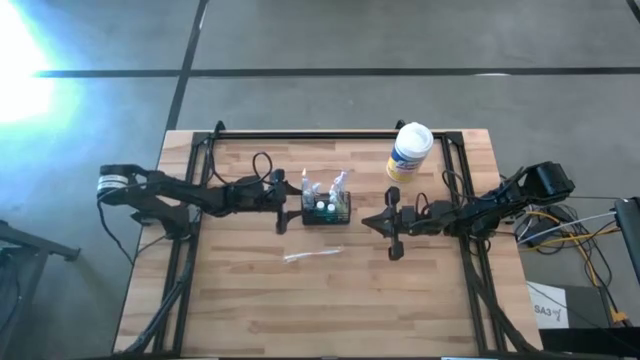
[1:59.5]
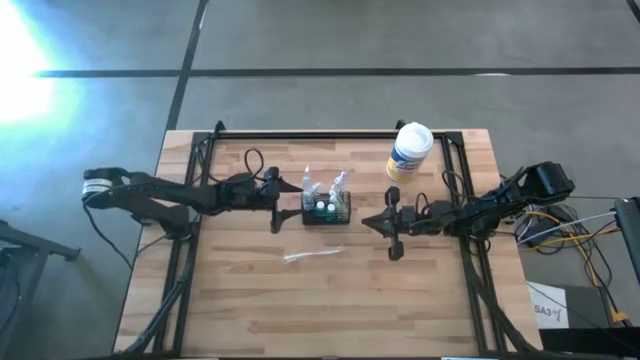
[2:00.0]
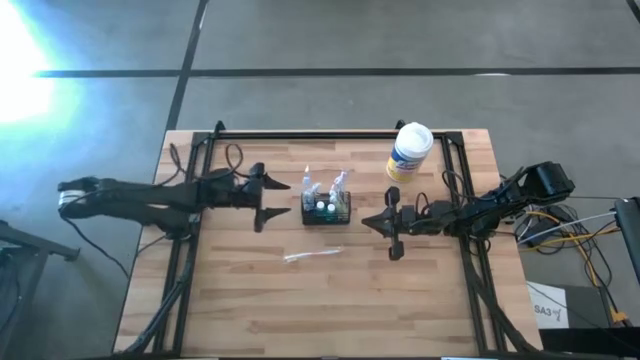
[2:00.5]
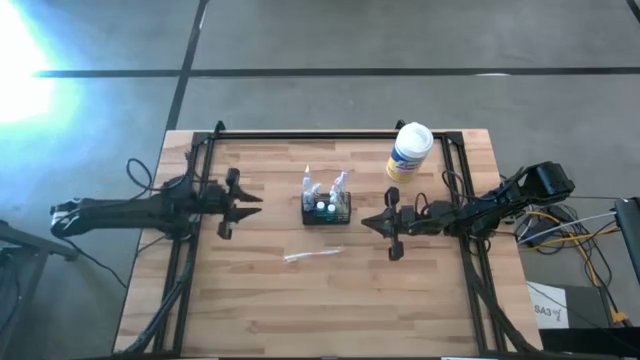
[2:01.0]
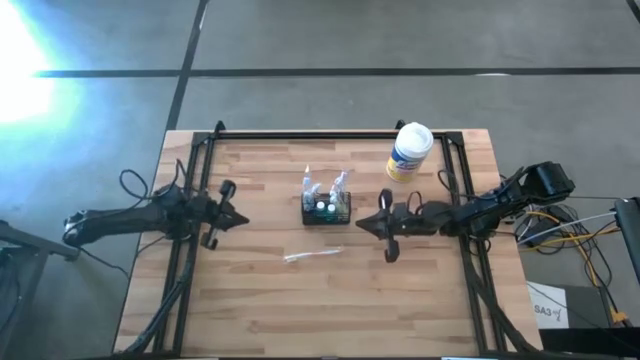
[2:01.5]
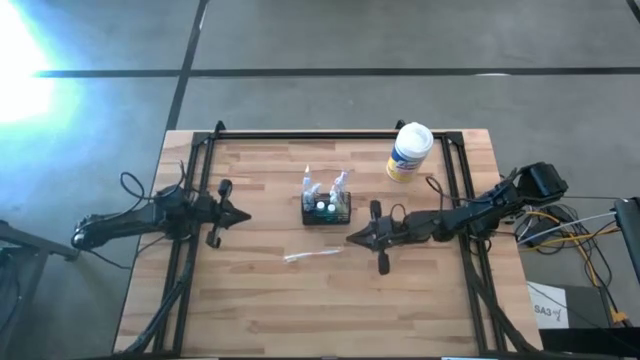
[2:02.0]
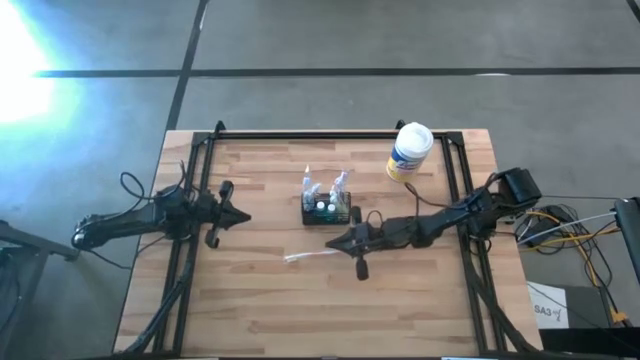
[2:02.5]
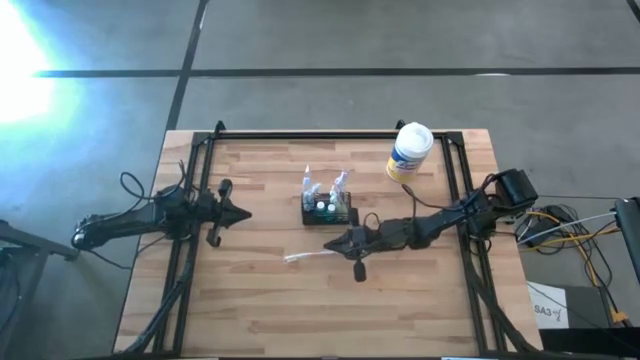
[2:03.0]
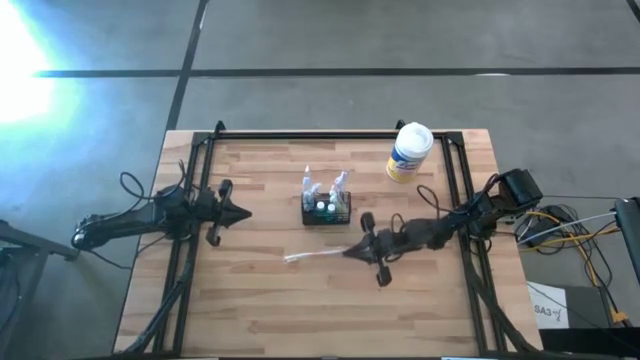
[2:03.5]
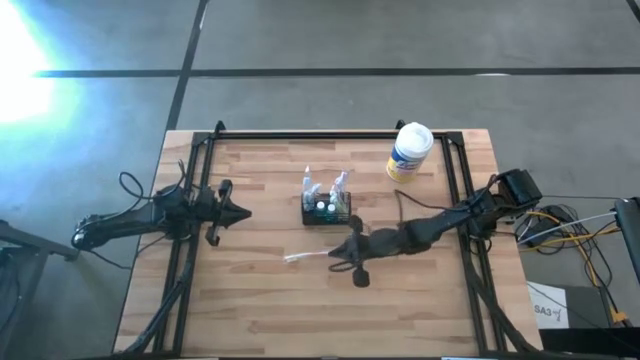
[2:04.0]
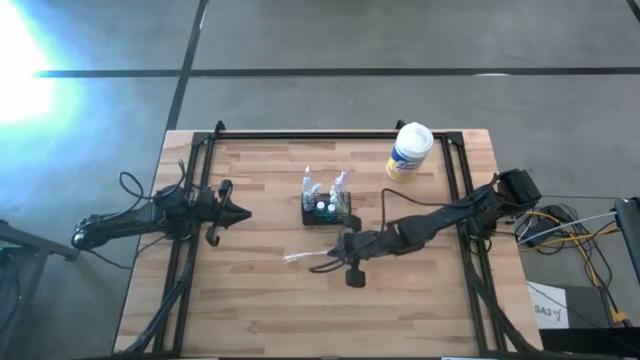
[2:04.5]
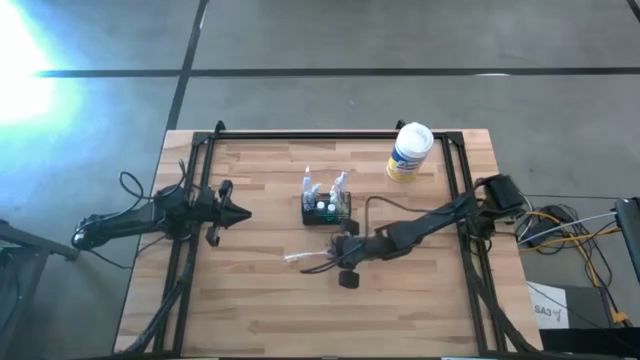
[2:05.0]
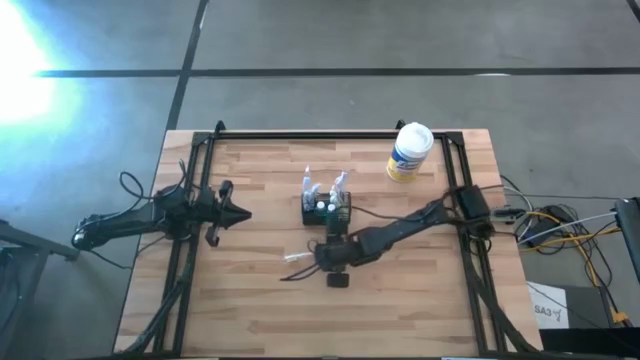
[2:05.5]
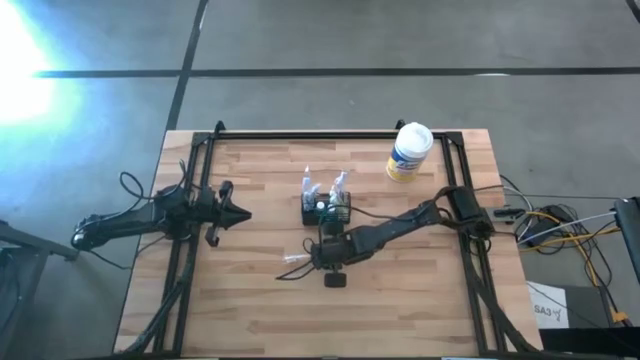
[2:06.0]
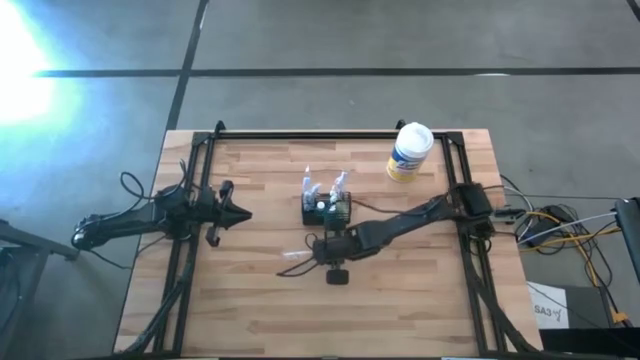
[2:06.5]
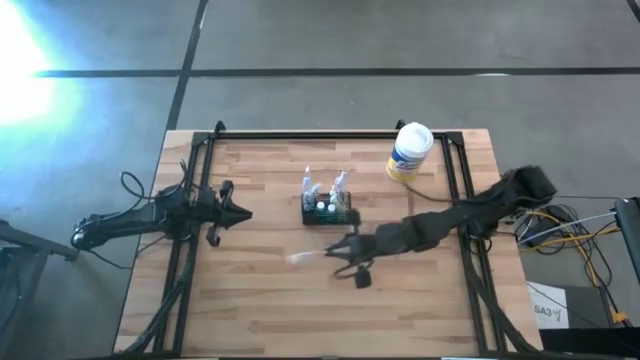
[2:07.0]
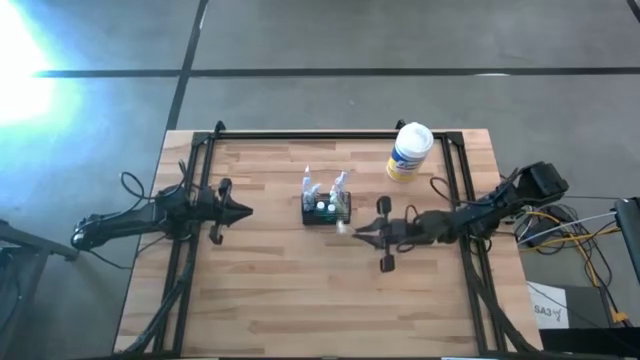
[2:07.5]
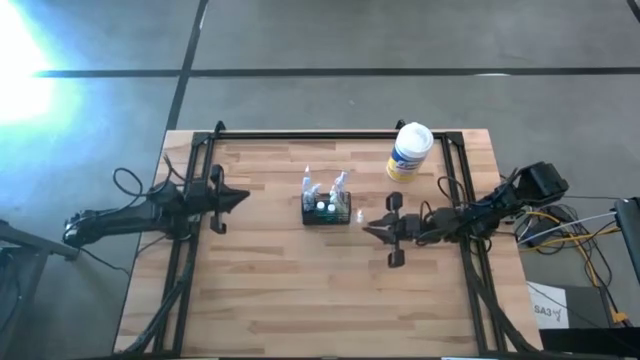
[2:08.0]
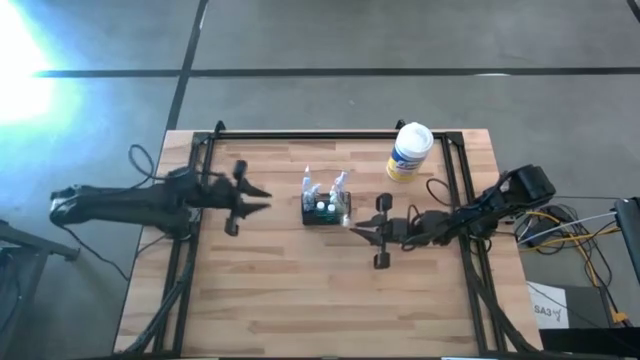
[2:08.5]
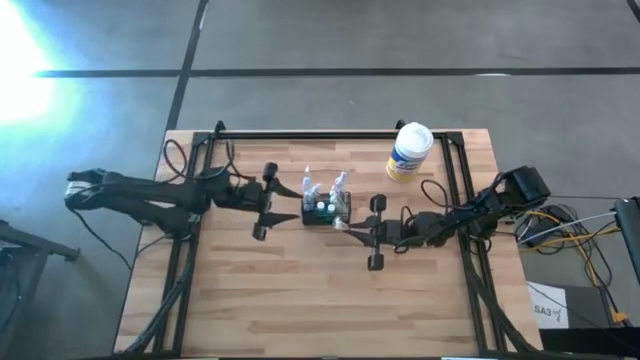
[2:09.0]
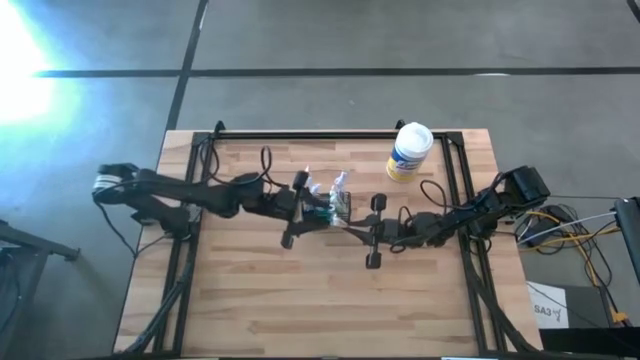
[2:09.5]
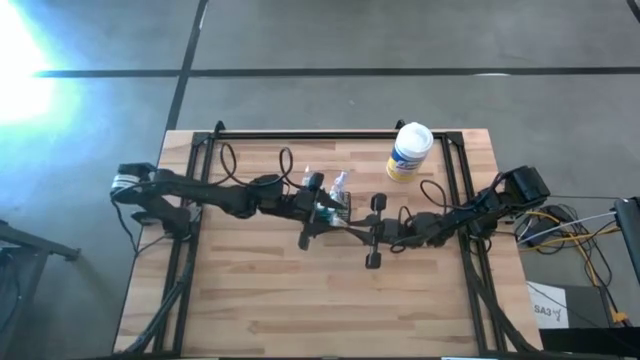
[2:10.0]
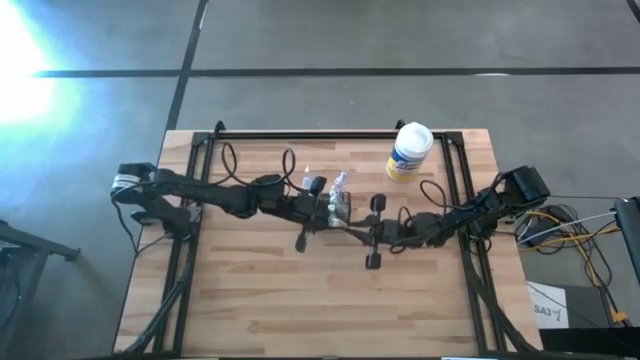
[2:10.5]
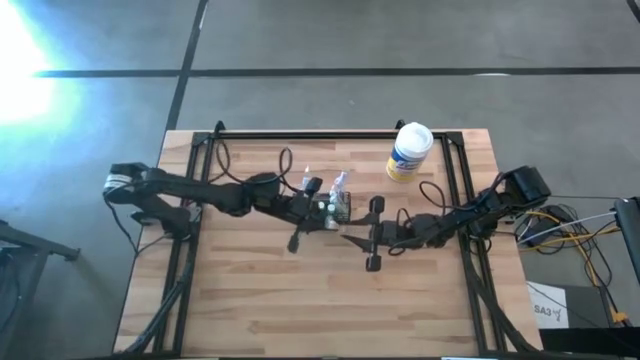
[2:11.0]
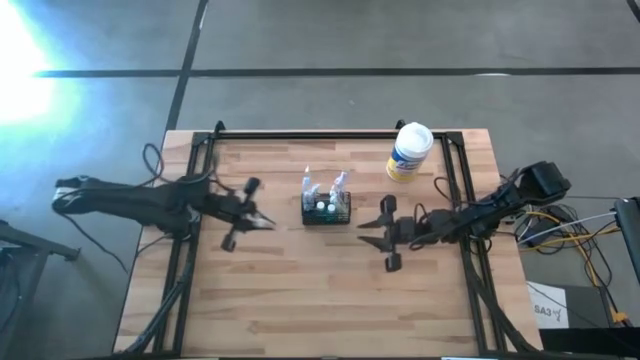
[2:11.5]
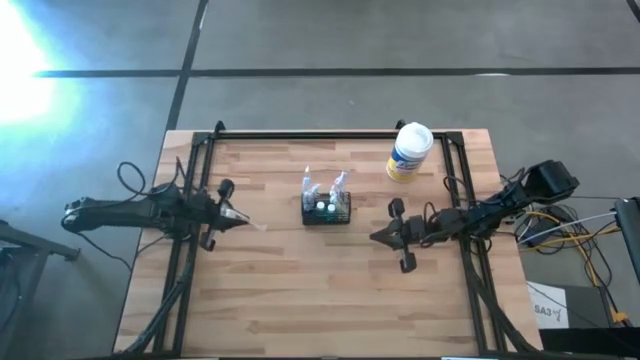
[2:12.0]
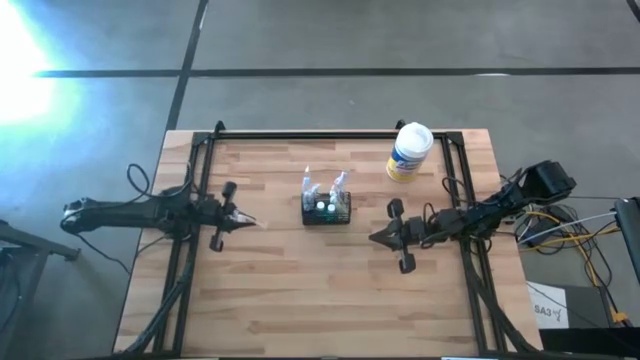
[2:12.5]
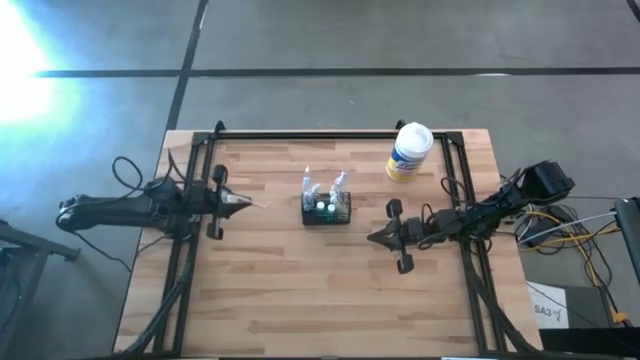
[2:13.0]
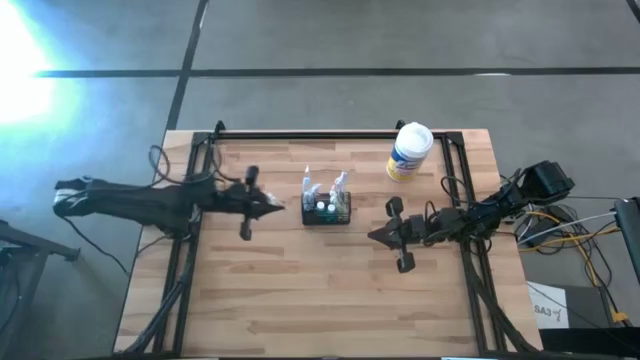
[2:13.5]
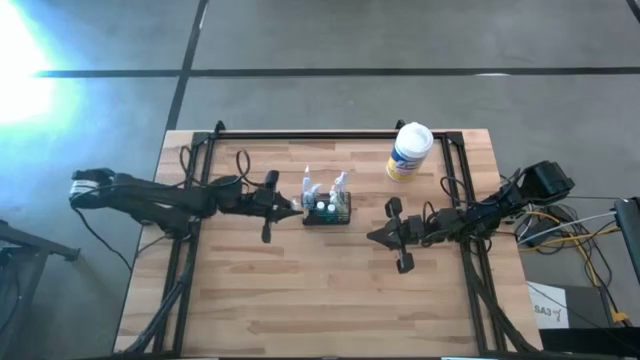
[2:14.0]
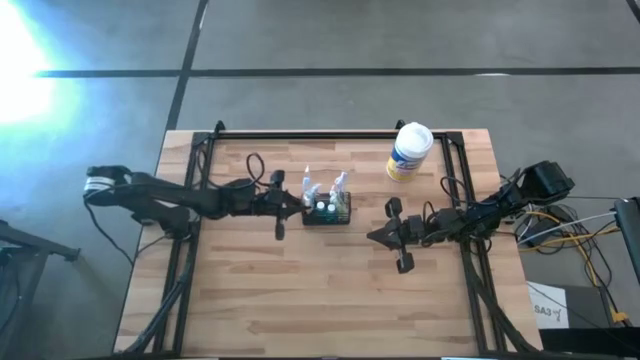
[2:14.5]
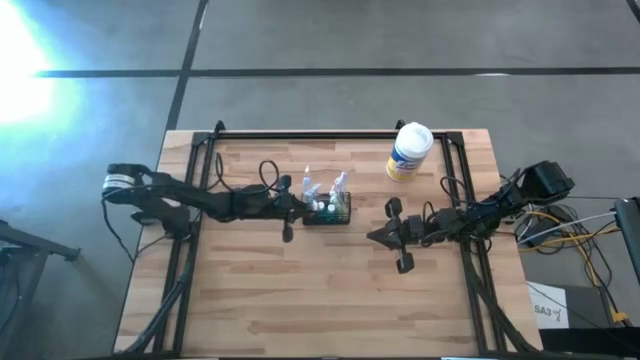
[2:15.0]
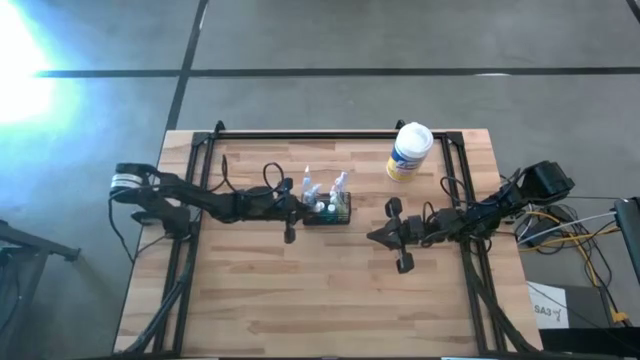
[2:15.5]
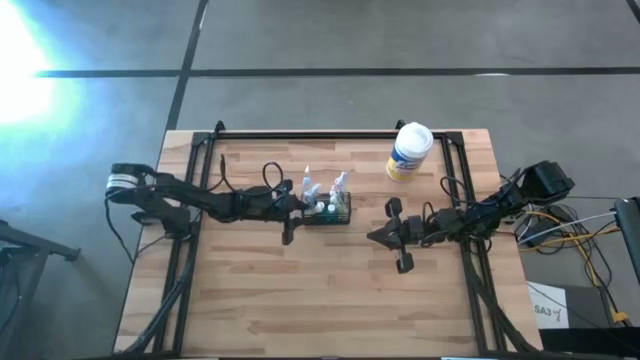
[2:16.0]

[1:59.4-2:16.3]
Task: Pick & Place toothbrushing station
Put the orange toothbrush into the black wire organizer

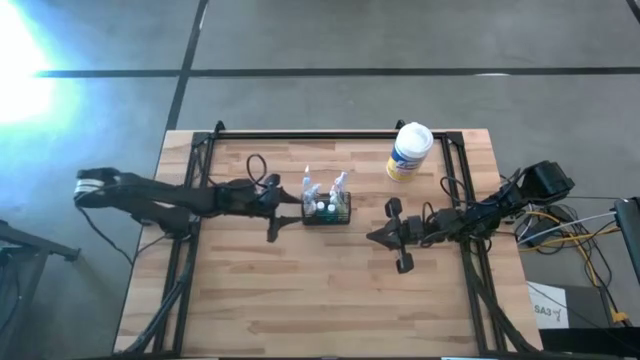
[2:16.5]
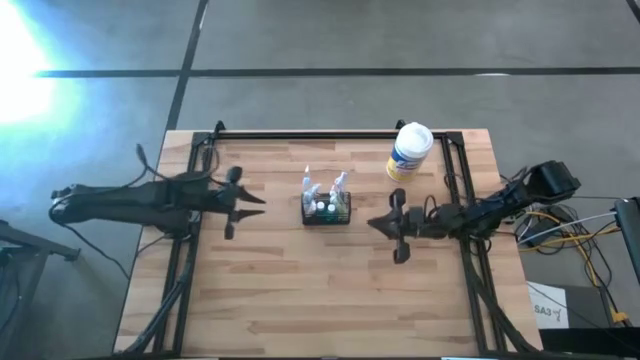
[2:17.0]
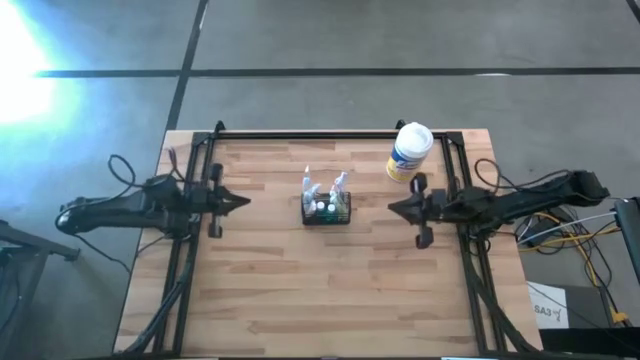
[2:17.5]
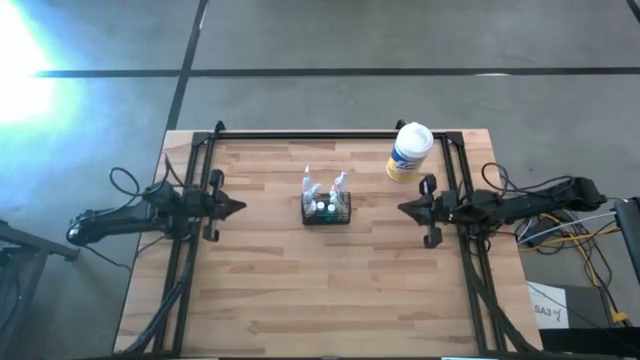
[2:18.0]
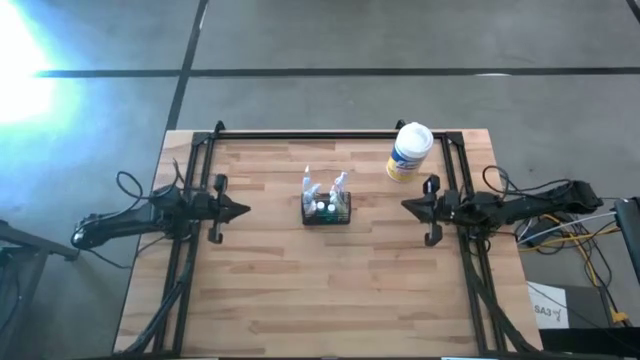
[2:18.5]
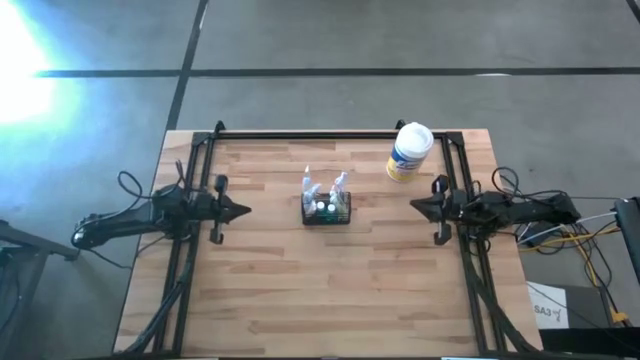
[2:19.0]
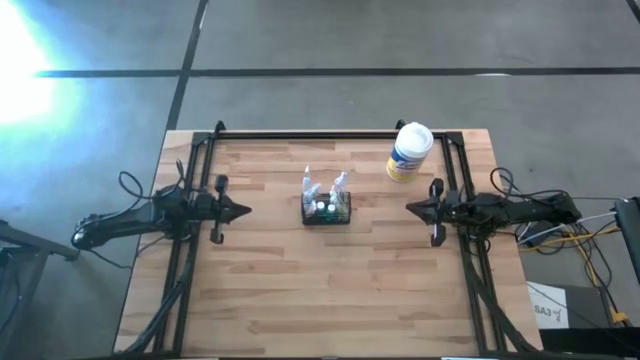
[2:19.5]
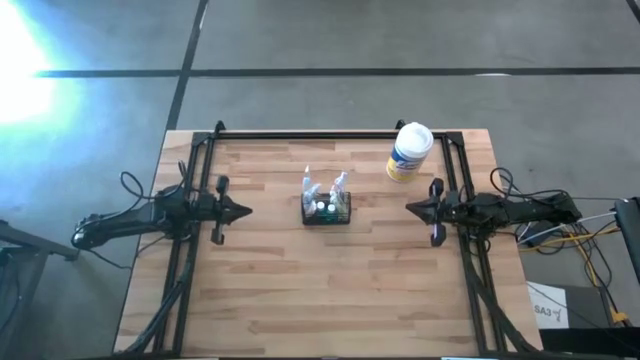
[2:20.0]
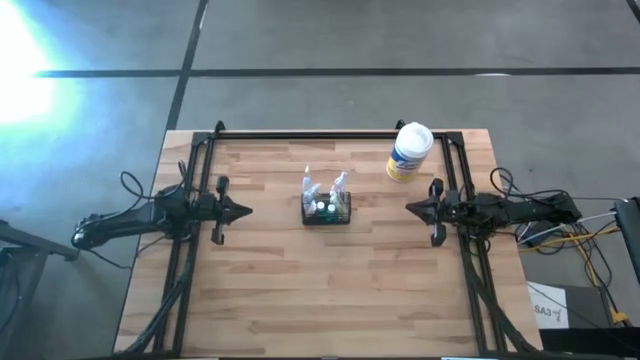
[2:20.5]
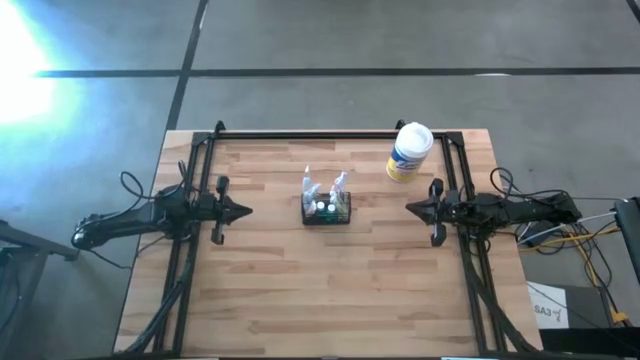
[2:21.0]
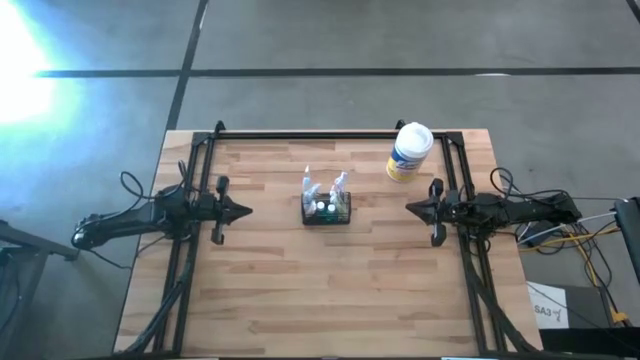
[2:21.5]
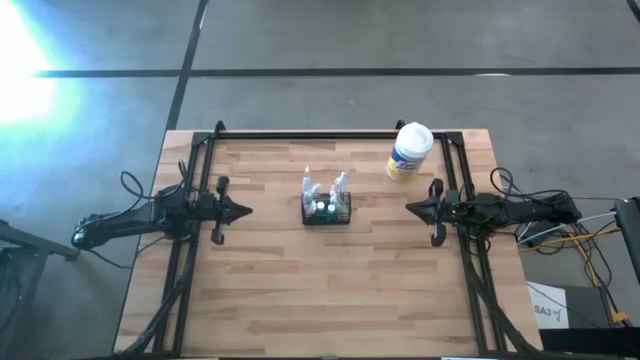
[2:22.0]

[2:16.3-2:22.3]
Return to Home Position
